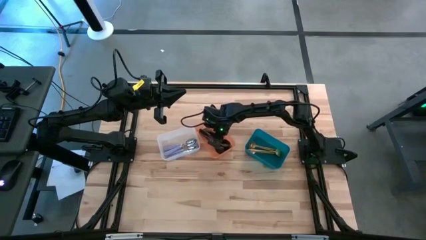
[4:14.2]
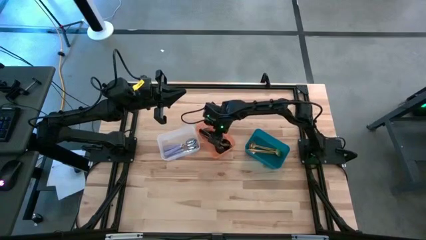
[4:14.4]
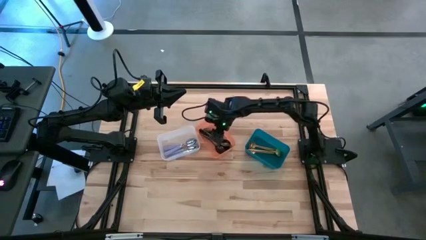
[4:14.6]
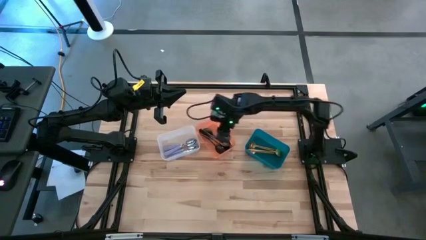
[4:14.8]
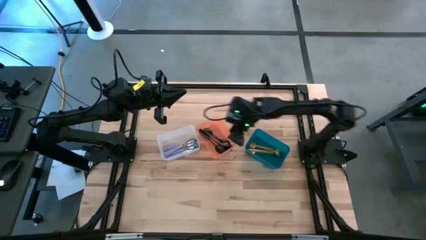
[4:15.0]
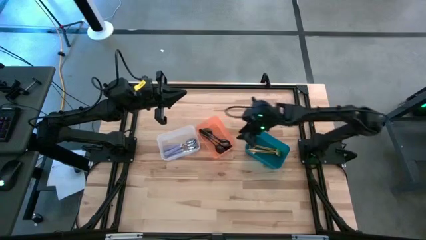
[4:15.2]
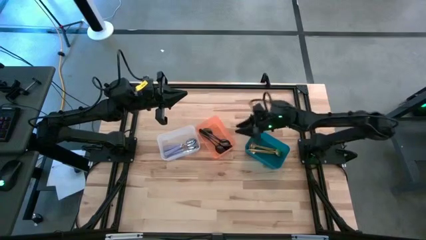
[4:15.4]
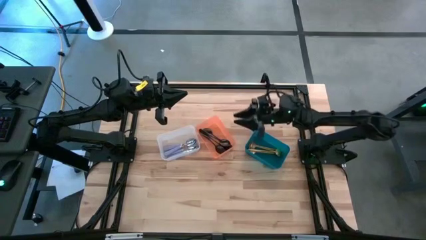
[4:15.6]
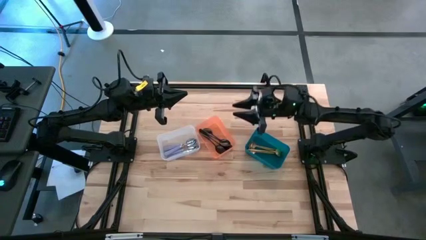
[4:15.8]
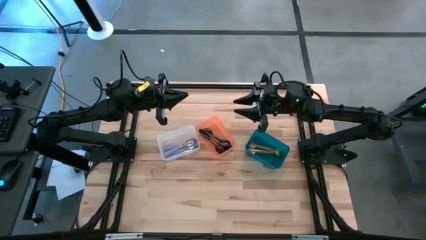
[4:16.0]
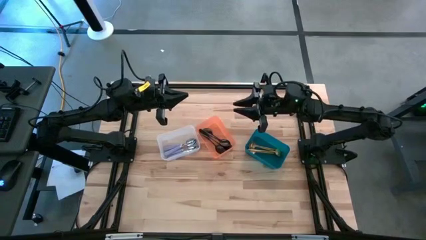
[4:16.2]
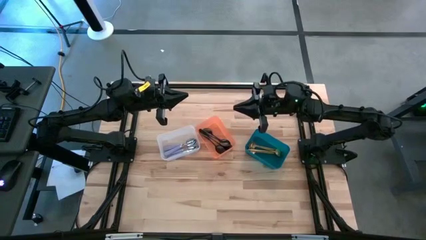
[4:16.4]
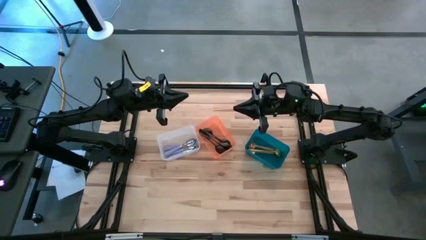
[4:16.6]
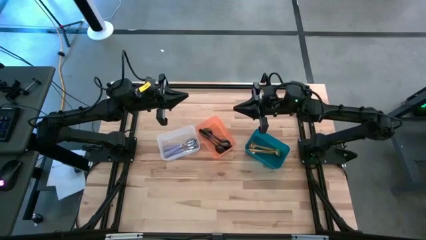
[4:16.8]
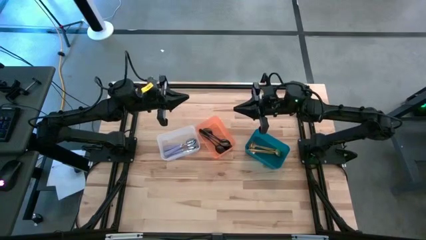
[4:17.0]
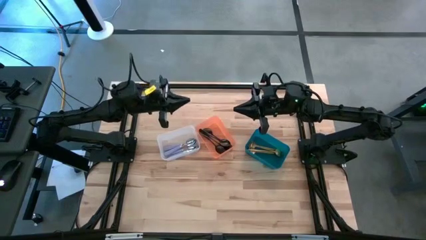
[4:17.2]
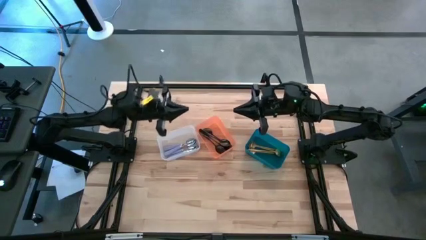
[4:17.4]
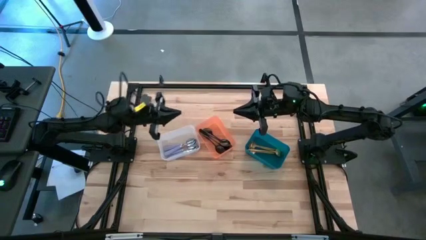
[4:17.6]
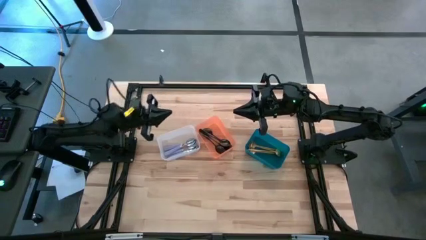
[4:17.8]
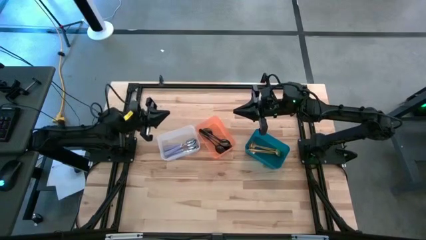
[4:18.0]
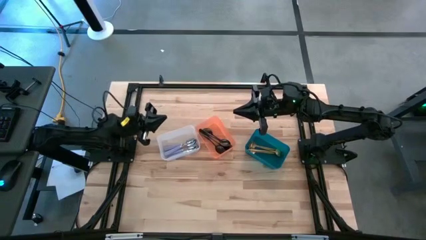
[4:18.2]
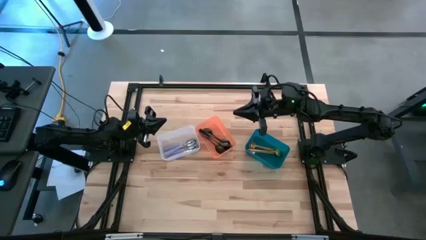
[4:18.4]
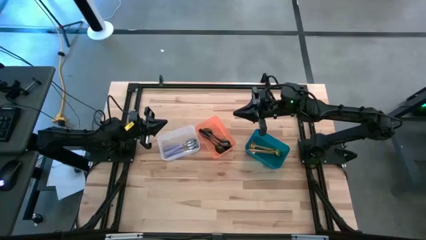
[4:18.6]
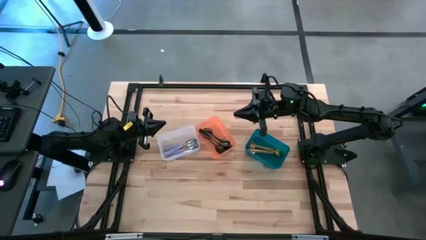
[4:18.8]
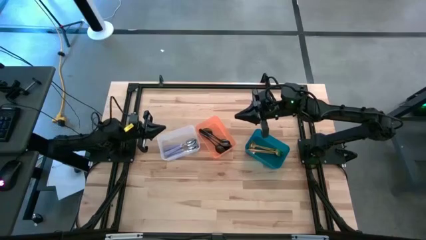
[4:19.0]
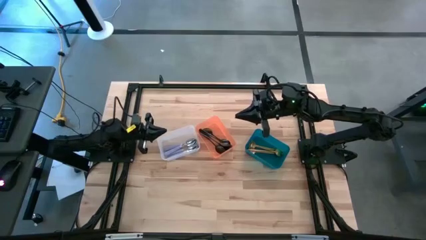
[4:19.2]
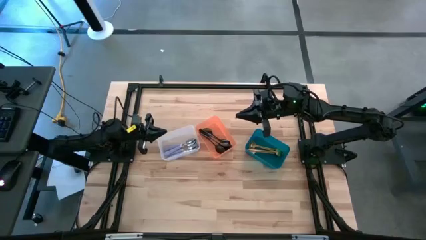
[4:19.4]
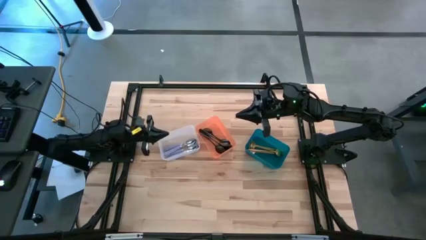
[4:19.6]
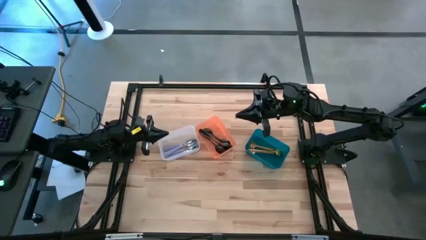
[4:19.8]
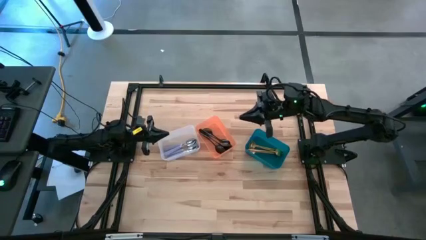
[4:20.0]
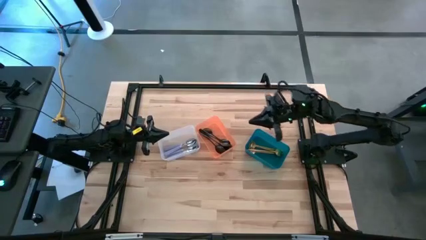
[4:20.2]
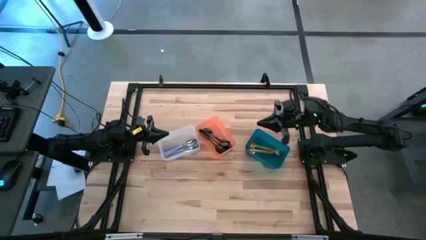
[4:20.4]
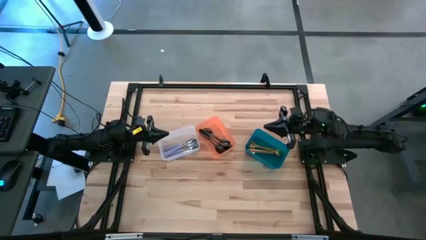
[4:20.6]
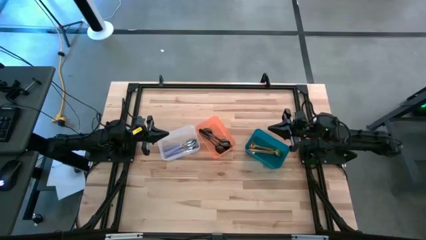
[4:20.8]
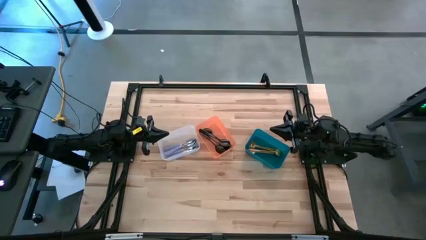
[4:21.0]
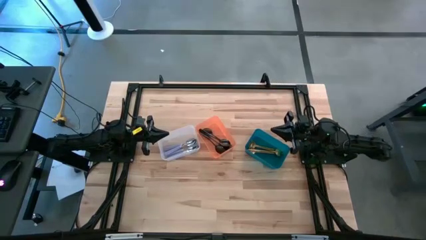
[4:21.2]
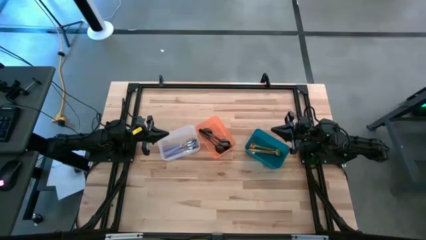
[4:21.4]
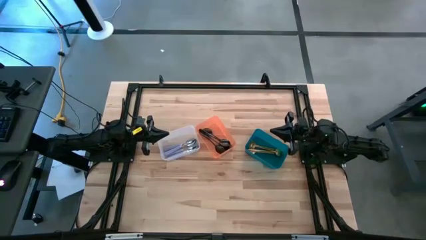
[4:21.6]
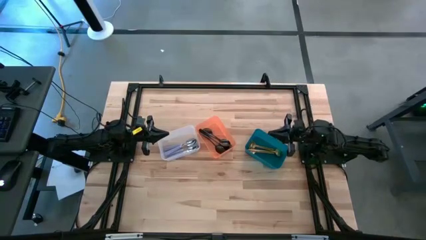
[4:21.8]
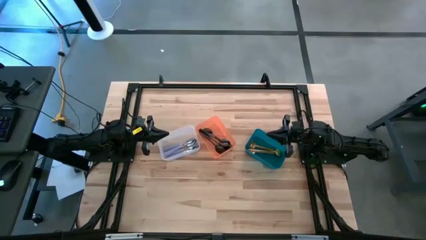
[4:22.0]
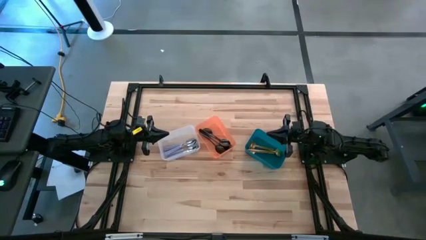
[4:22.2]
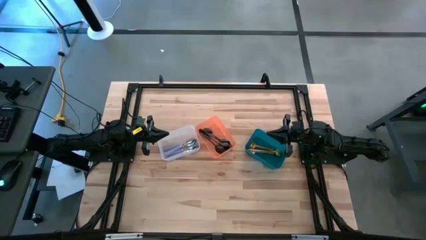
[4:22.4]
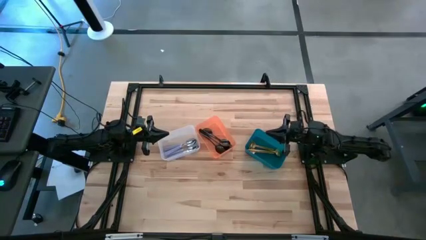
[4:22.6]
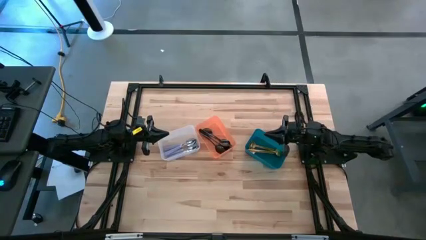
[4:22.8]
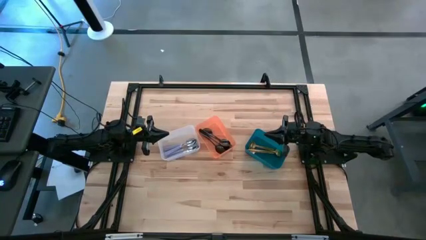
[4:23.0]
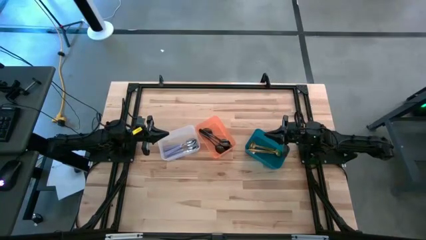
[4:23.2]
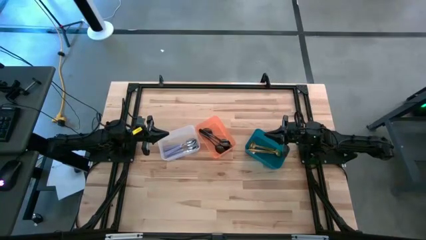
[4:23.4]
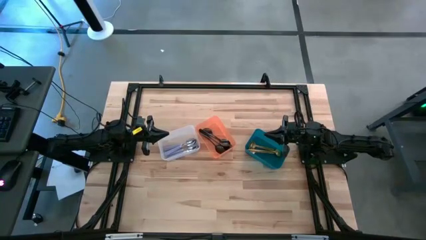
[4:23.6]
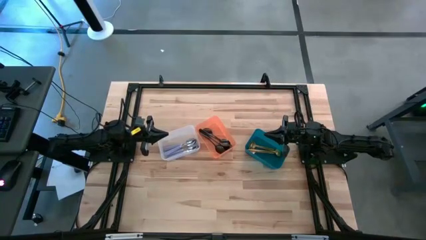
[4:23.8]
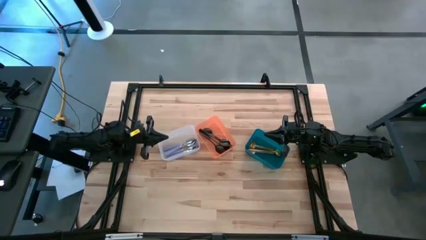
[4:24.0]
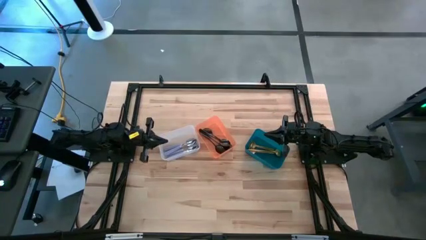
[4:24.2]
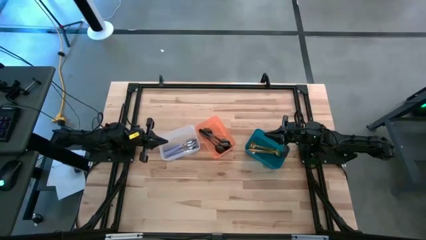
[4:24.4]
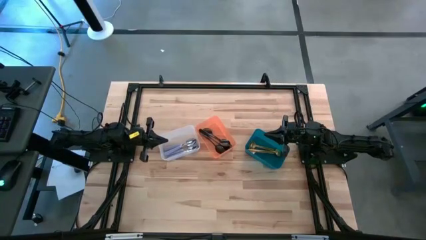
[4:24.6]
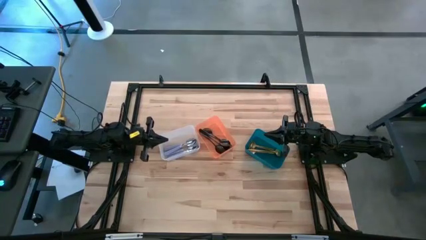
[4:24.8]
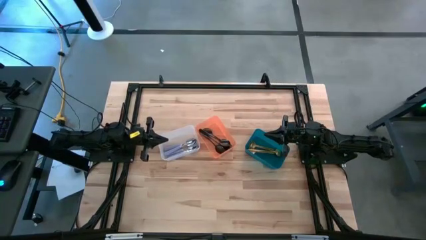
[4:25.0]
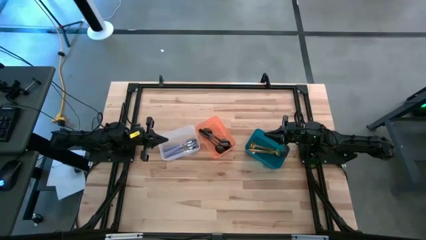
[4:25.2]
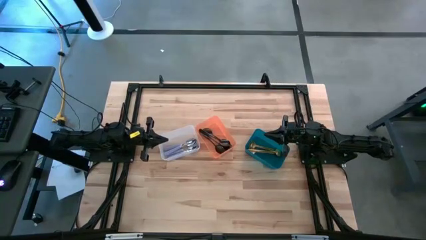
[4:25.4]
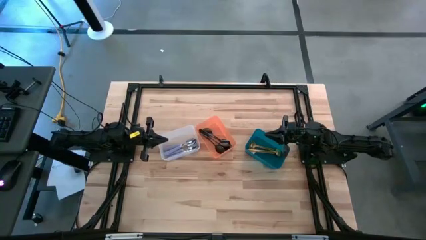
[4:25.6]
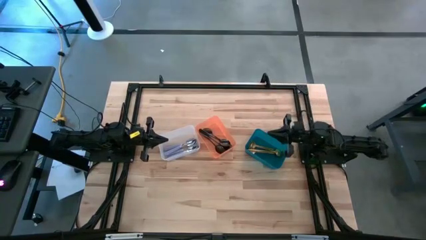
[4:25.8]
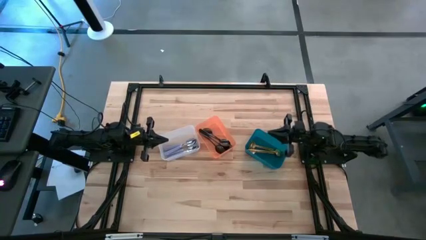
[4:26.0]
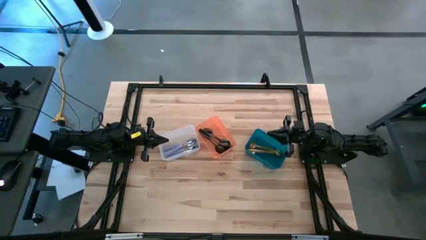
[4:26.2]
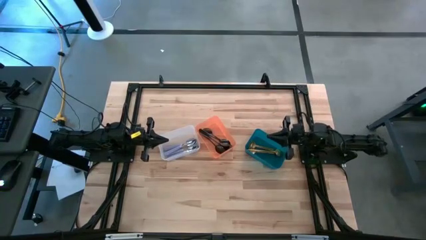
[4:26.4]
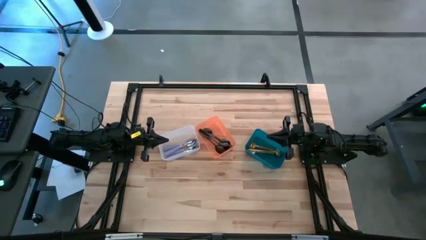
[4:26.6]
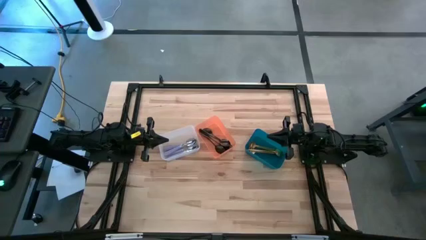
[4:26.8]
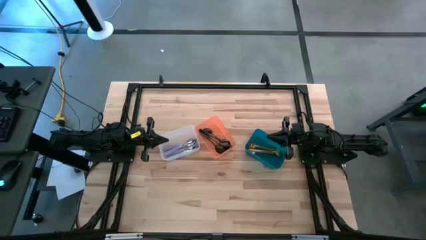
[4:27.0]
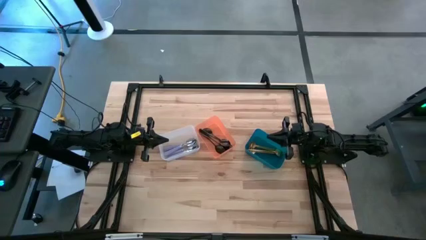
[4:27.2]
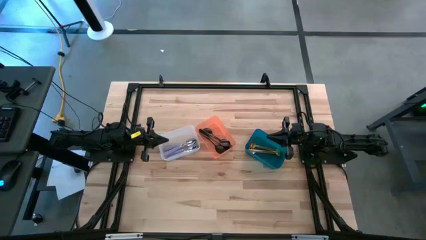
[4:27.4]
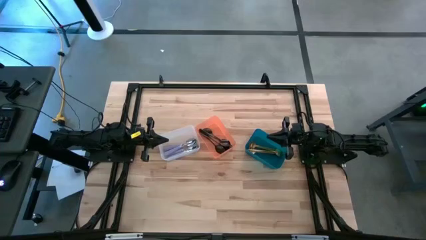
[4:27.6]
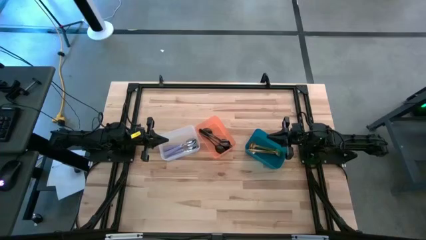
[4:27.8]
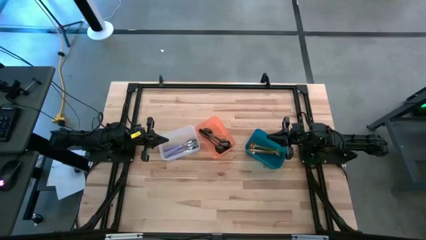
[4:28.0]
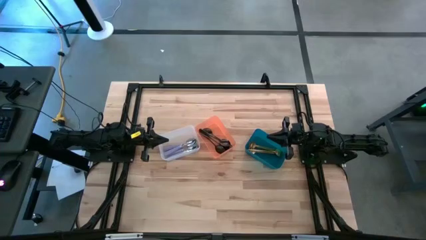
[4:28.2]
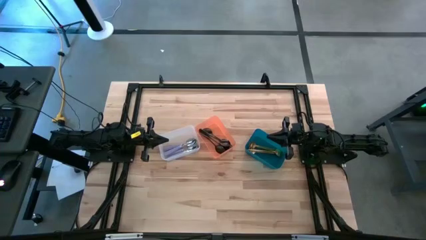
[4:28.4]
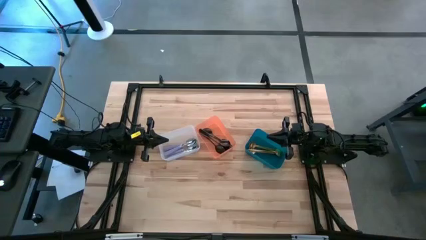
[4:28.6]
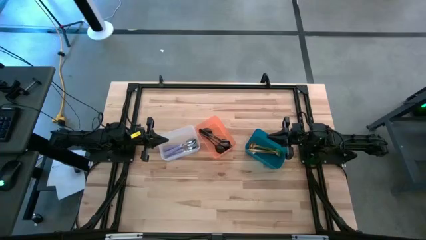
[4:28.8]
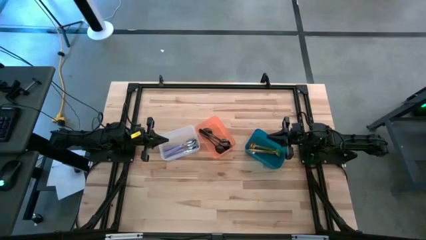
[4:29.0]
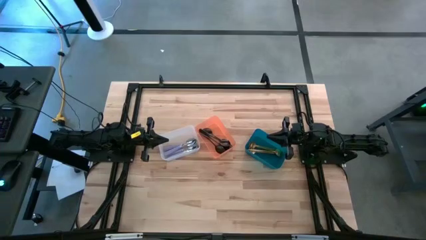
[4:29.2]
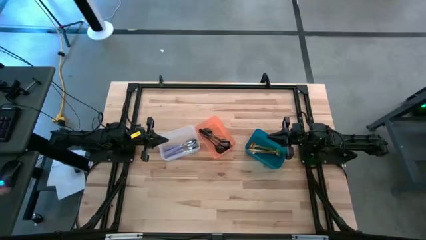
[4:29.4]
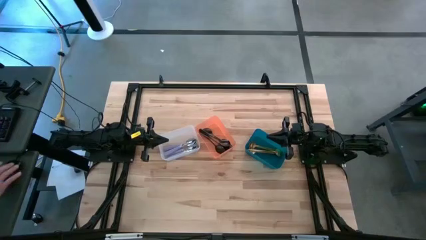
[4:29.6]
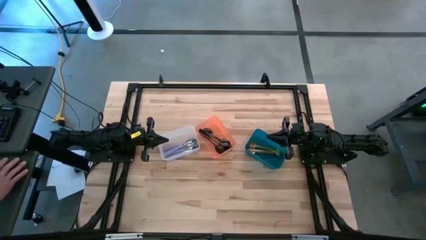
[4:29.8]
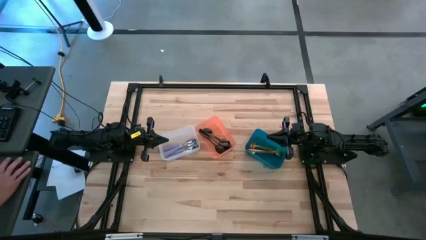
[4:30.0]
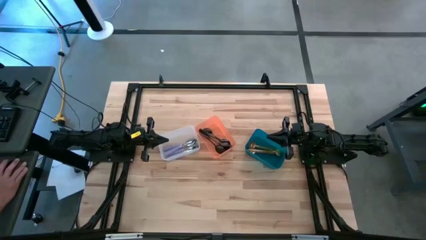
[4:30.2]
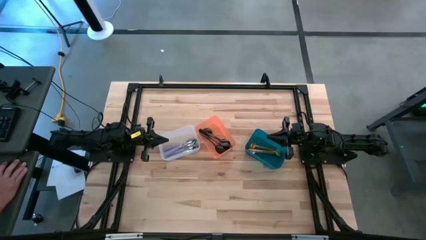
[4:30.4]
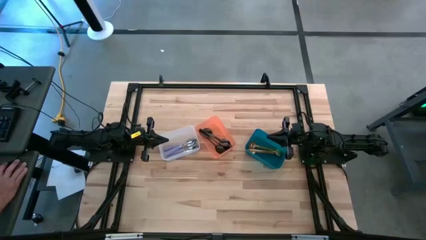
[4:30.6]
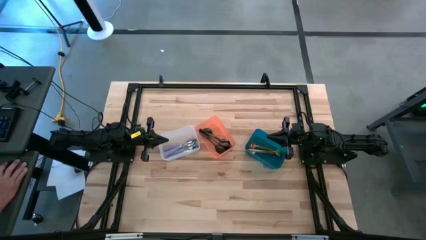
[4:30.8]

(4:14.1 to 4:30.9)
Task: Sort silverware by color (type)
Return to Home Position
